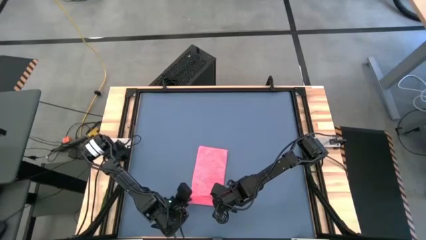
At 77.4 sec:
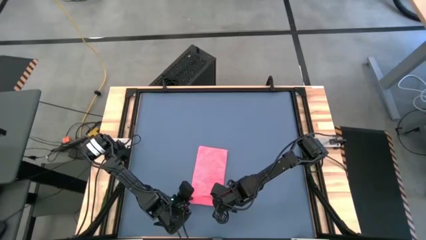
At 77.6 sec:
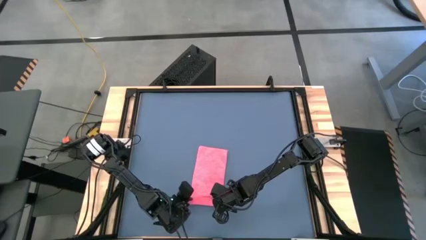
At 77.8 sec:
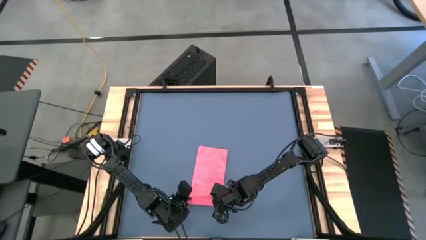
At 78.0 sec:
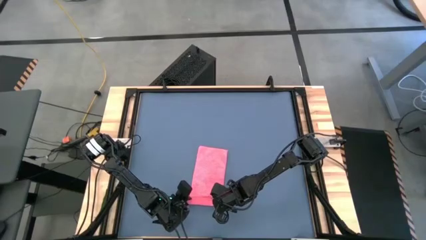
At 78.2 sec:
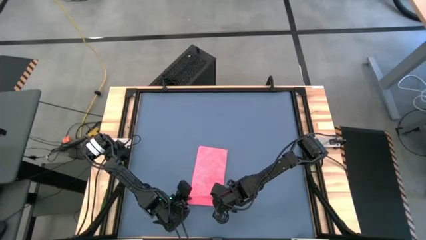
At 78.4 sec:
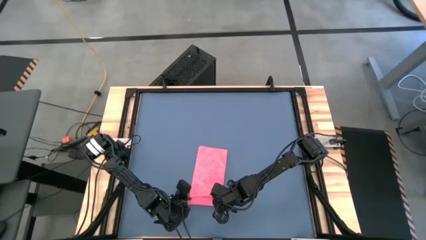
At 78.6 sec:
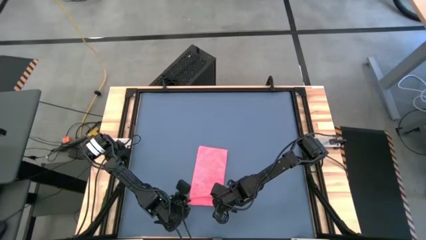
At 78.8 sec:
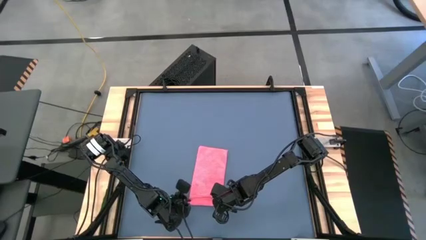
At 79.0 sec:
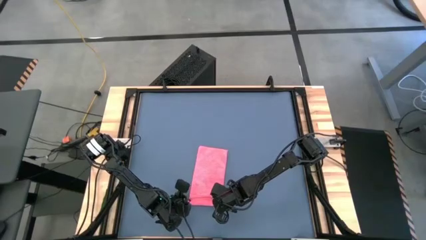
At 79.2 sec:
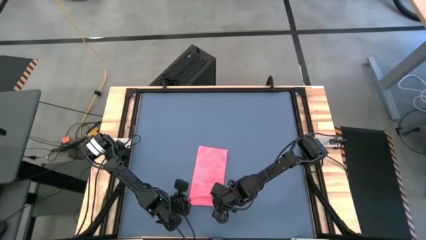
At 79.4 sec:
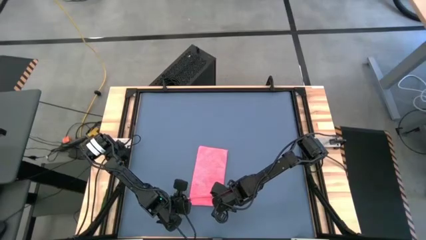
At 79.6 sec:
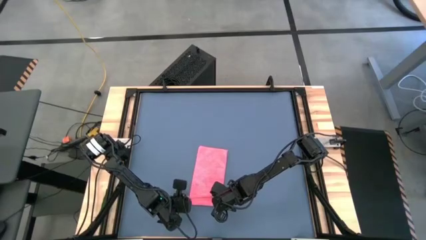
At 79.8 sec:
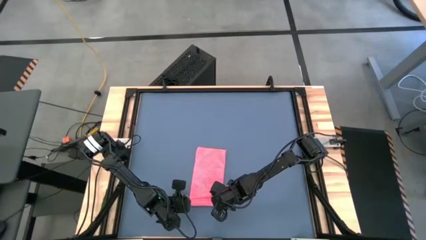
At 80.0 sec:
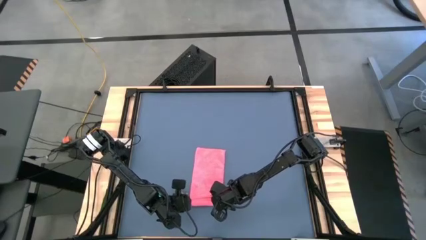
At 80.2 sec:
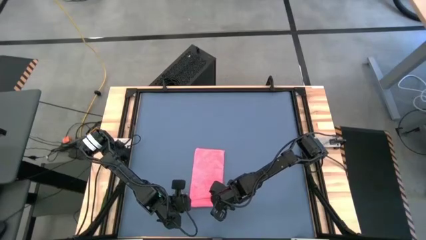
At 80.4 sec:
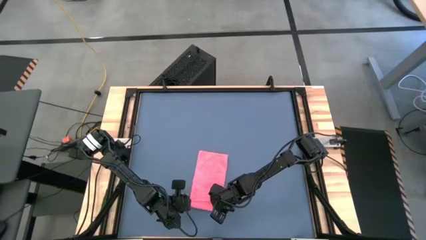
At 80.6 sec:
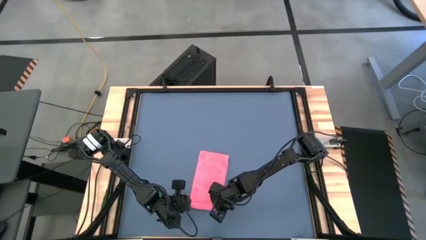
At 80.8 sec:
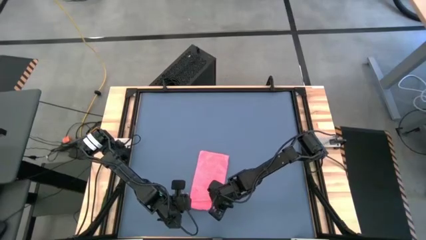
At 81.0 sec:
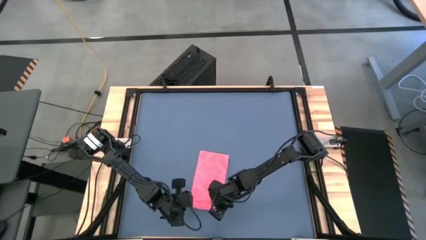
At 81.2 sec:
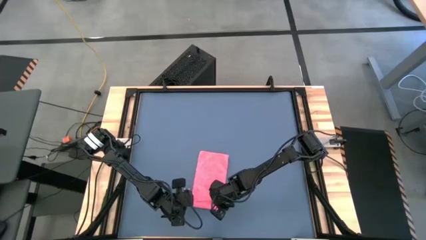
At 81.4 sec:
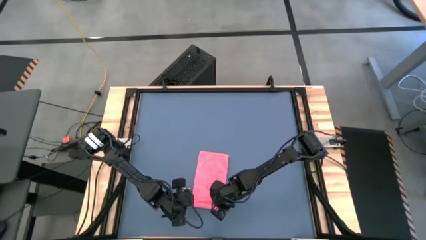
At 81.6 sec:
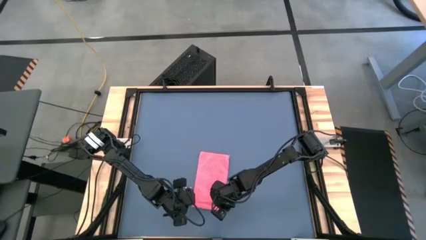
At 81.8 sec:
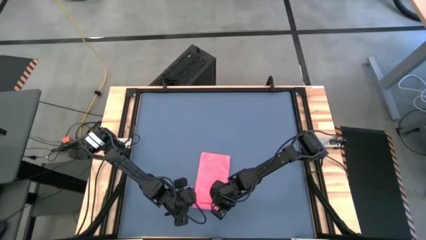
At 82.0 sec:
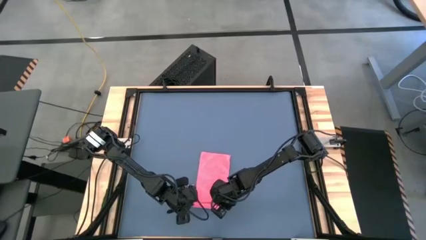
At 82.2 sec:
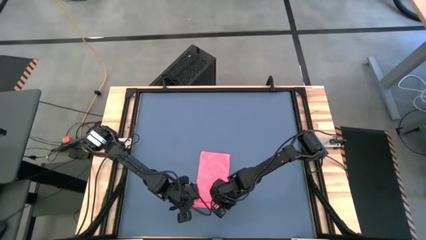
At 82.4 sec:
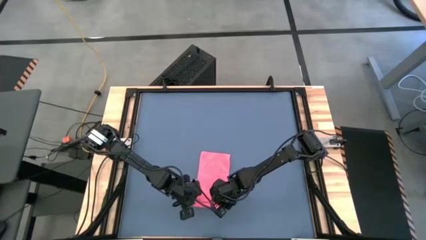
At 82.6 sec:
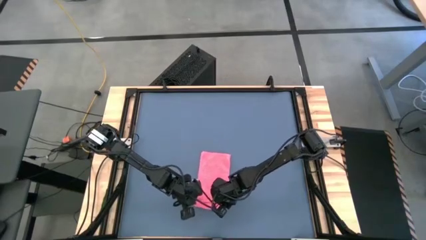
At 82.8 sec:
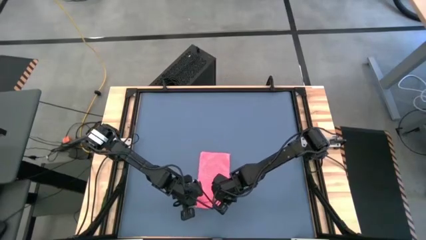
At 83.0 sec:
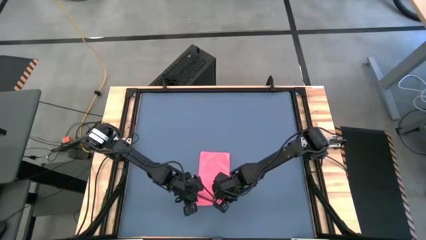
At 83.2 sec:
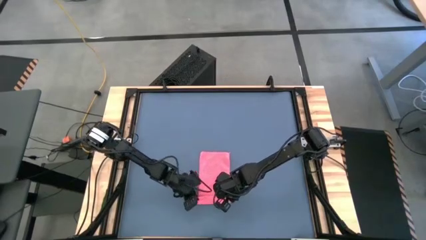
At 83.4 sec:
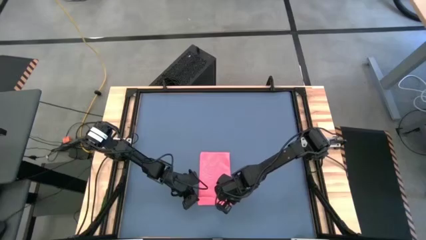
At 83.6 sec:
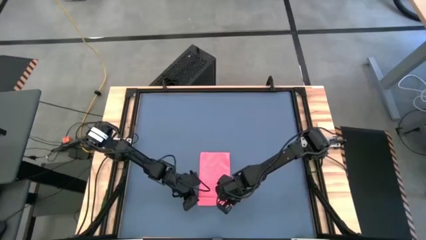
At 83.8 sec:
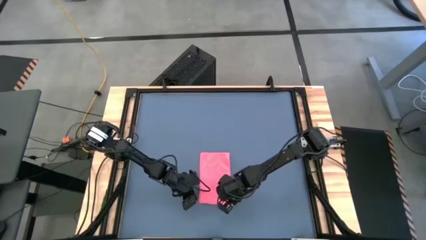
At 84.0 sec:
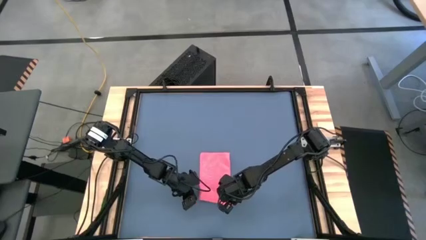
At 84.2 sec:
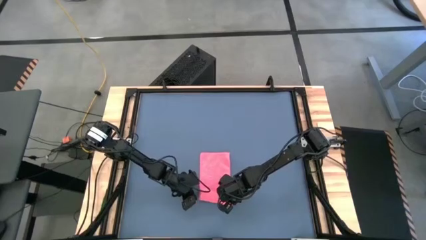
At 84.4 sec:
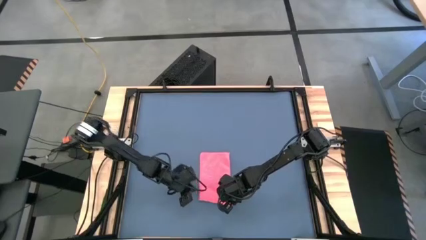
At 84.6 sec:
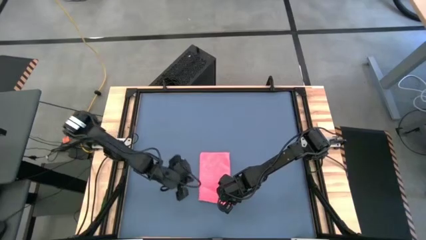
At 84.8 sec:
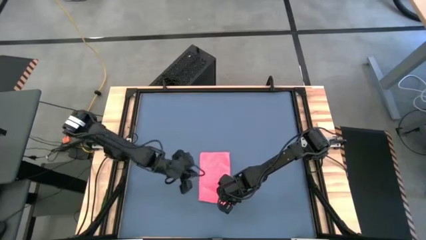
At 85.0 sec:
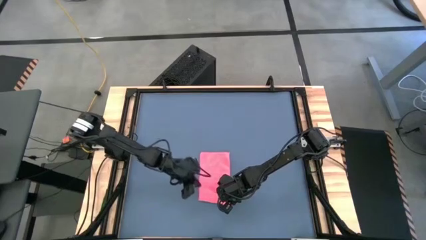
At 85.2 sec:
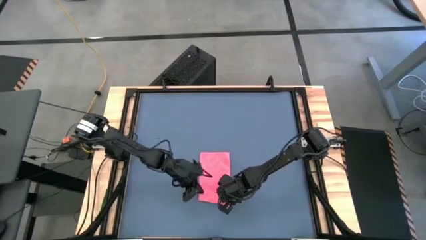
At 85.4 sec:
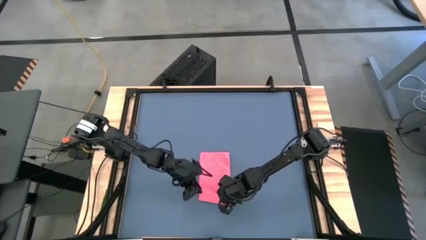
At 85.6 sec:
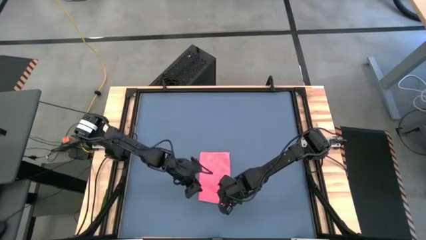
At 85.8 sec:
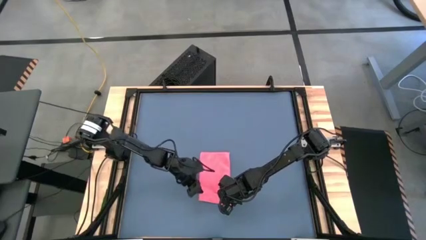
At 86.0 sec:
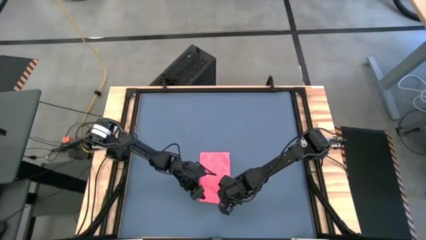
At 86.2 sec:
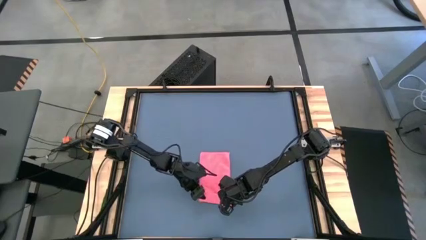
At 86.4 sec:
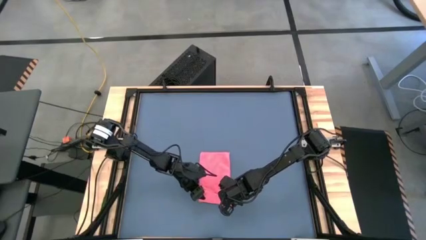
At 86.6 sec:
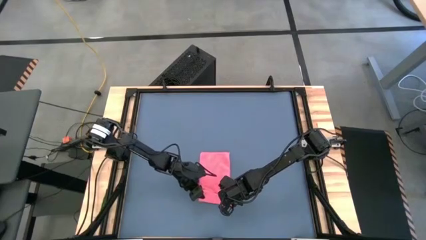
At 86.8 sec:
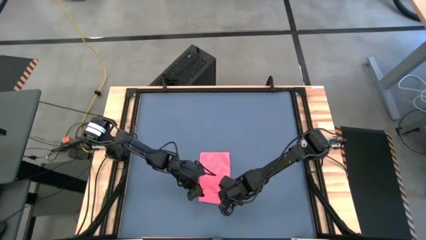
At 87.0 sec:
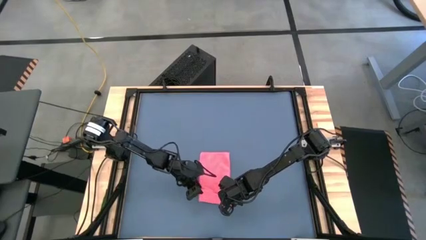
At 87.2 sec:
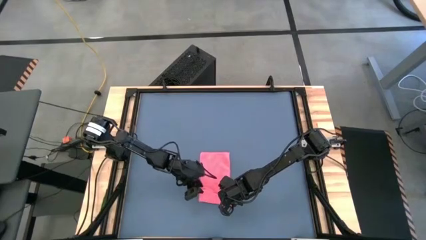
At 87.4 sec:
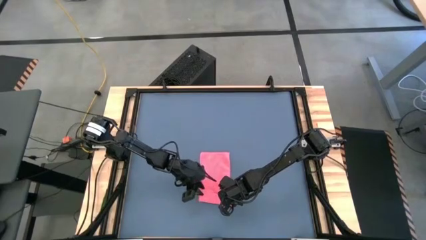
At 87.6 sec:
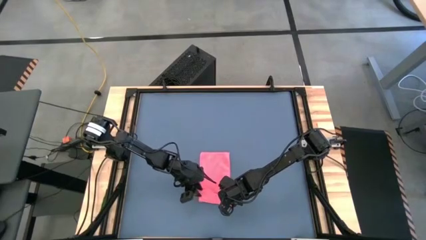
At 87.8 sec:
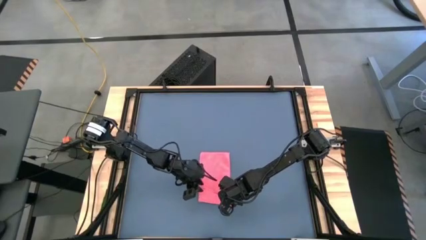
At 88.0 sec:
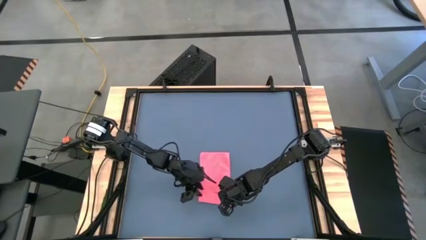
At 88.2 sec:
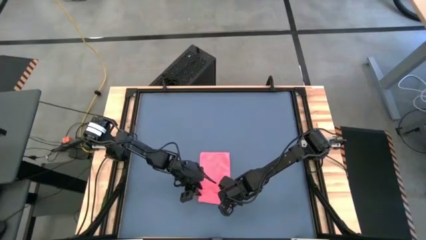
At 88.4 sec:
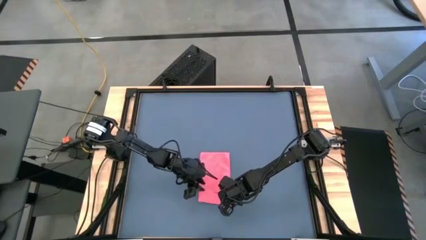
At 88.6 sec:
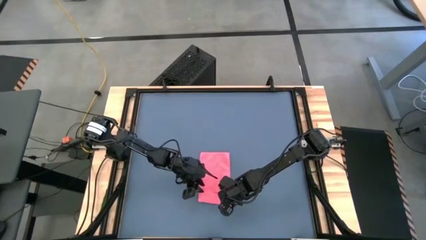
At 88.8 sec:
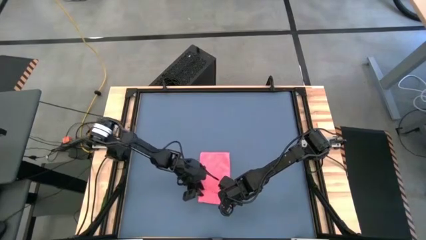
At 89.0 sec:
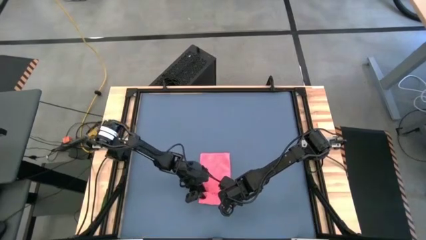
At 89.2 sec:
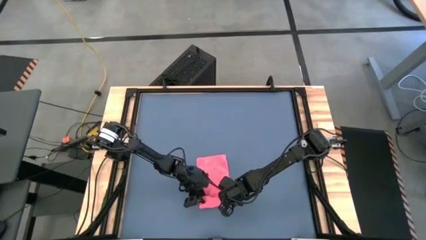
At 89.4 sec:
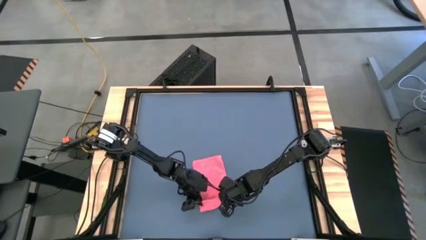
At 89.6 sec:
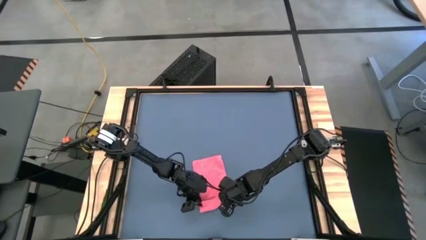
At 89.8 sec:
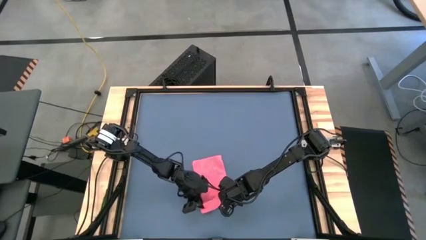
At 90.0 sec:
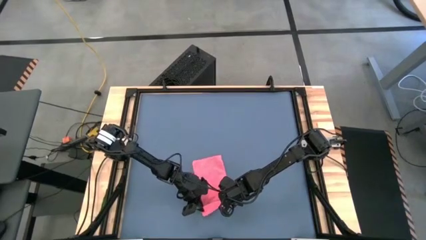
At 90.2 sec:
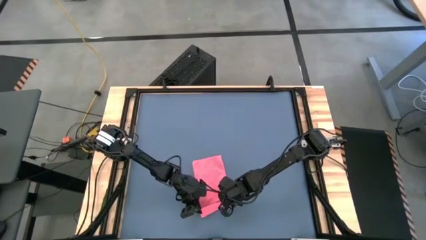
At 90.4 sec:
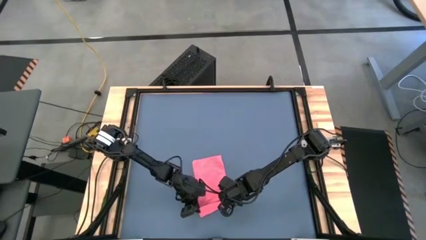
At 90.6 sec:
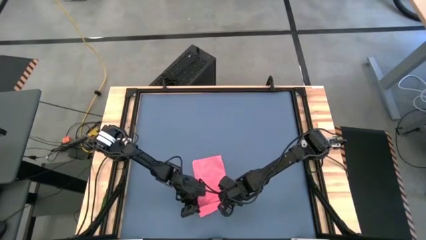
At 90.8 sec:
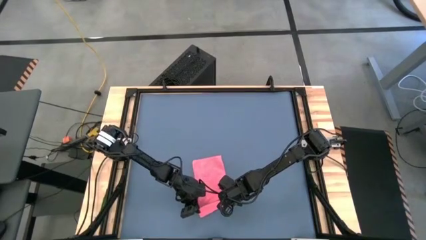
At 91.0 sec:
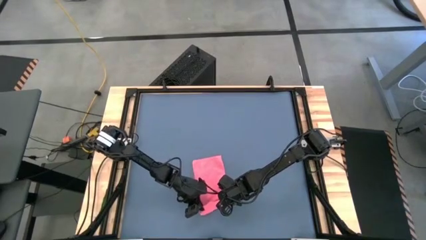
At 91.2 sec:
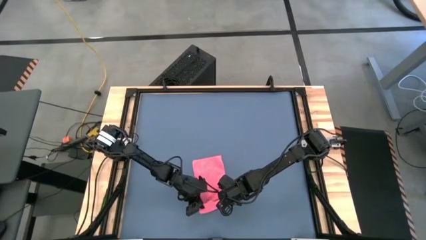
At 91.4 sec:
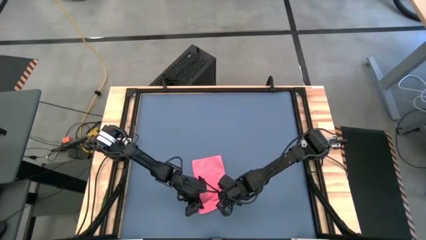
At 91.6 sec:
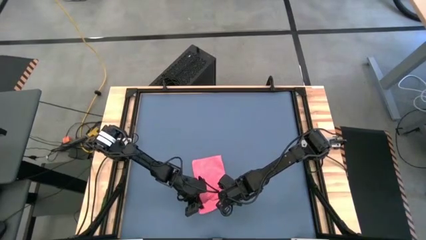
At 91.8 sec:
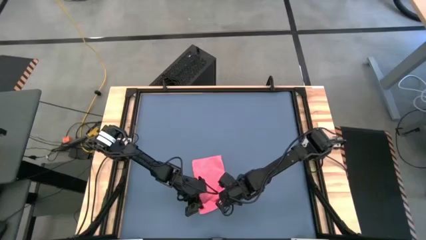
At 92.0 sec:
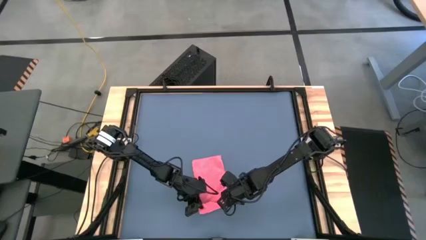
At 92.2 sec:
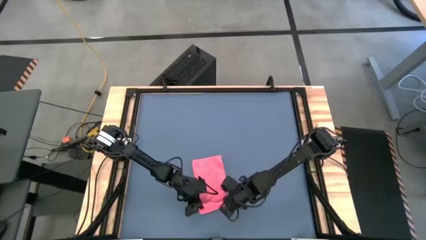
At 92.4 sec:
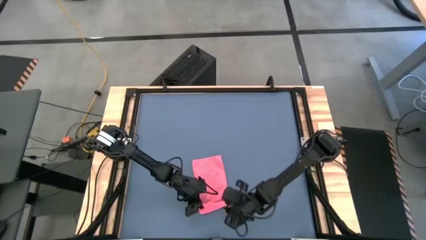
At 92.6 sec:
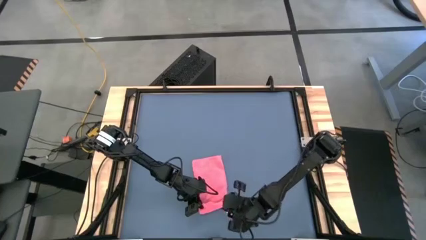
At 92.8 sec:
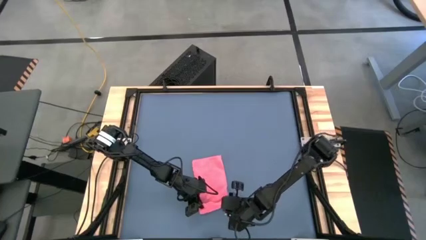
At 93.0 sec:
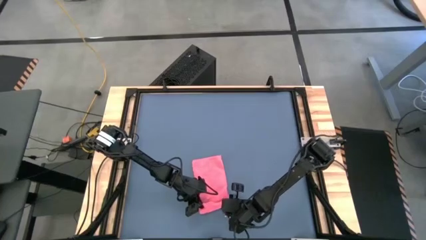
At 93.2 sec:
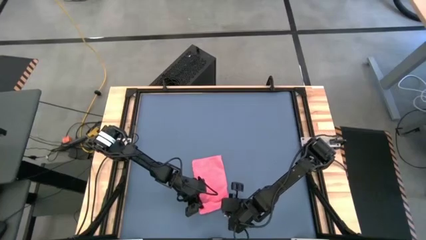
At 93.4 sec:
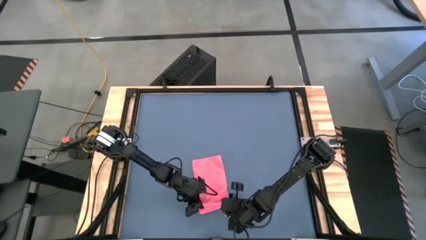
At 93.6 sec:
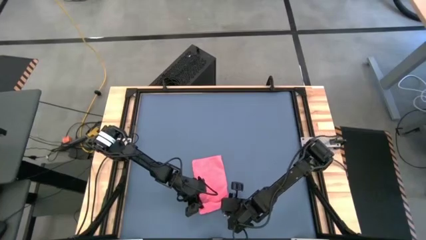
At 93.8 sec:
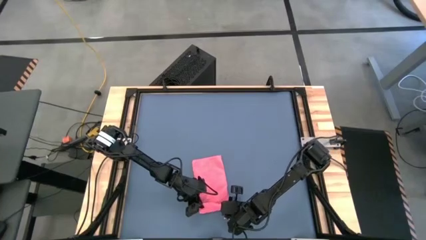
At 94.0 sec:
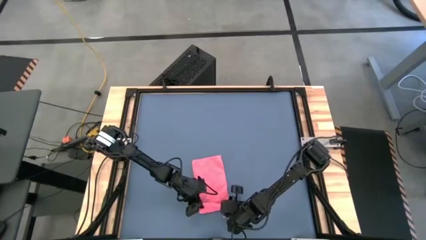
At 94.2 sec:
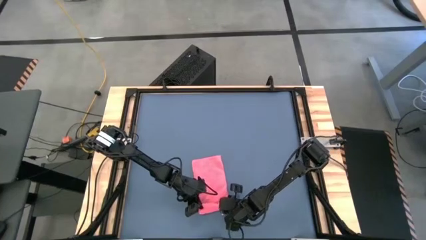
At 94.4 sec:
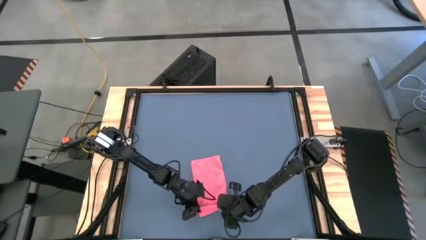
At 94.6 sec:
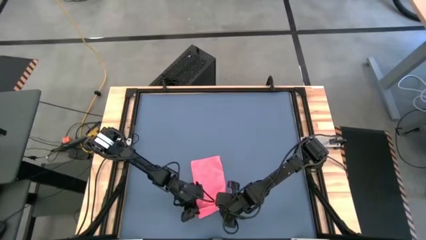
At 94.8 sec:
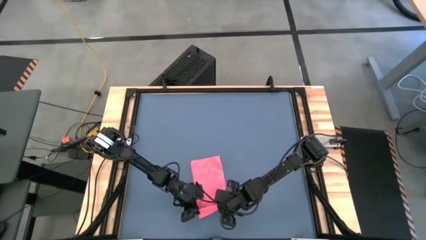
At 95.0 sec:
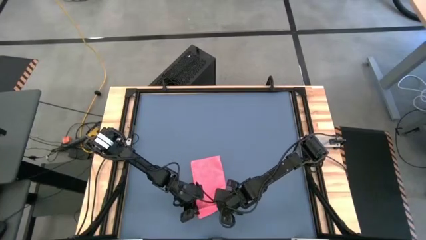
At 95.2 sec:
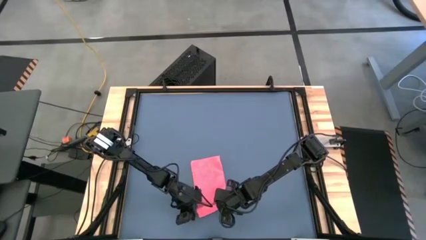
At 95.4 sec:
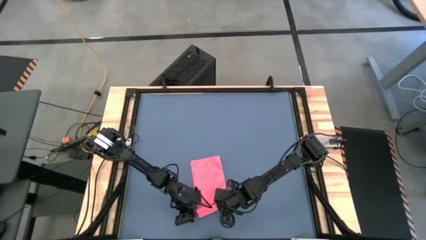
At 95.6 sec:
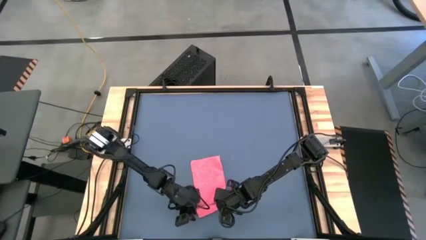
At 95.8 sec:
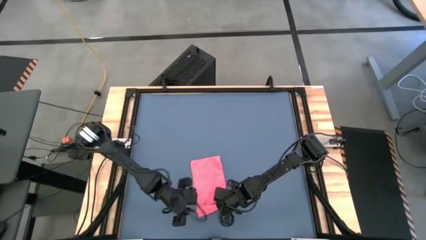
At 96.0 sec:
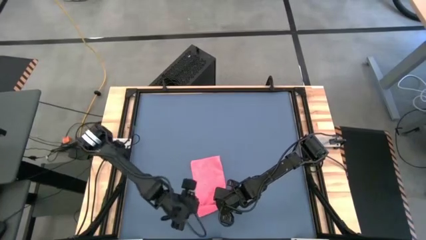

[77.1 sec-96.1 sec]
Task: Roll towel
Roll the pink towel
